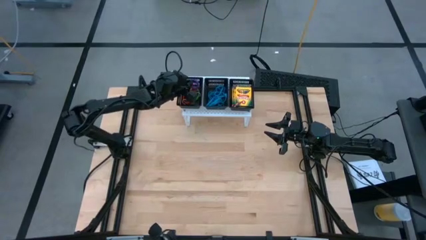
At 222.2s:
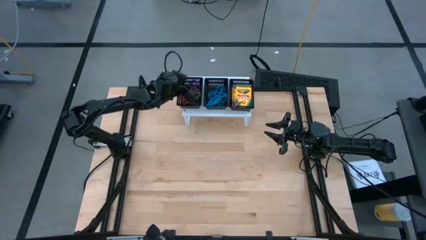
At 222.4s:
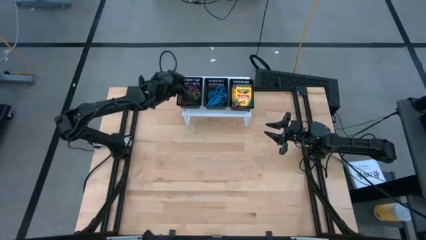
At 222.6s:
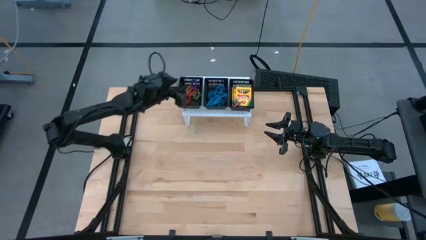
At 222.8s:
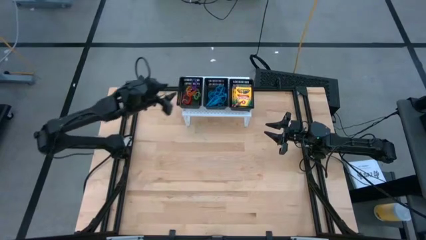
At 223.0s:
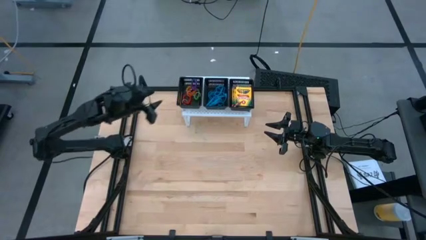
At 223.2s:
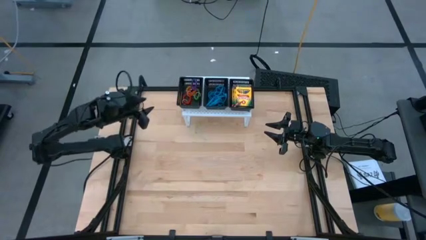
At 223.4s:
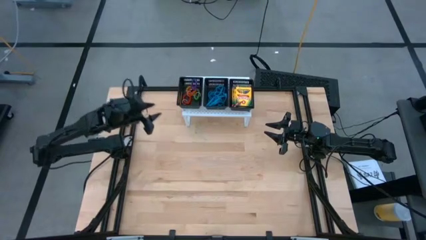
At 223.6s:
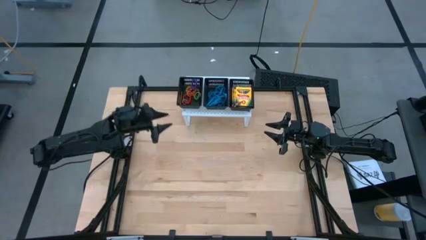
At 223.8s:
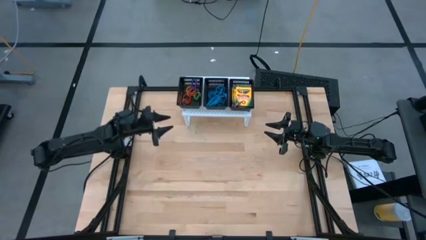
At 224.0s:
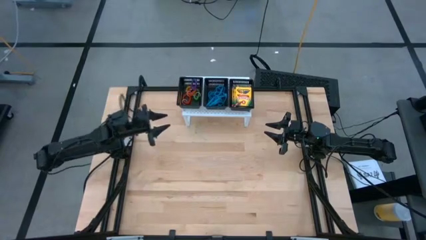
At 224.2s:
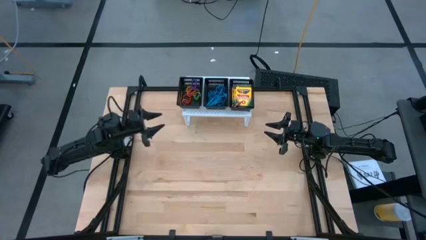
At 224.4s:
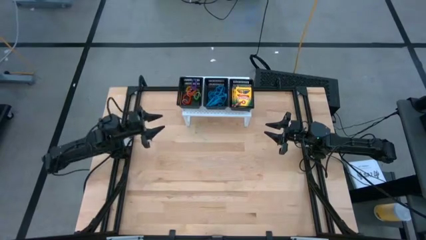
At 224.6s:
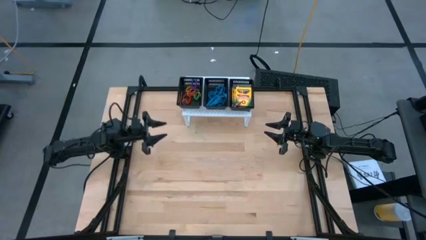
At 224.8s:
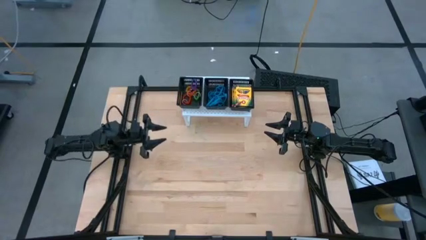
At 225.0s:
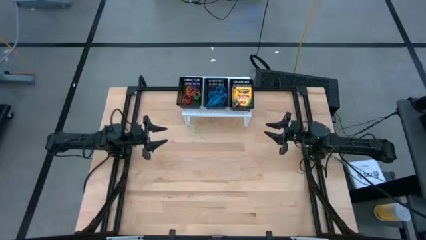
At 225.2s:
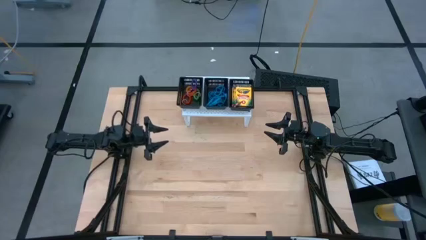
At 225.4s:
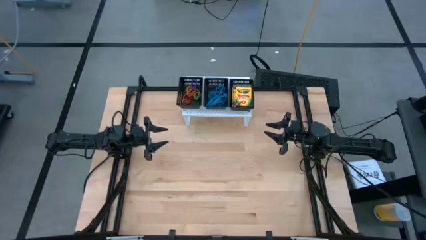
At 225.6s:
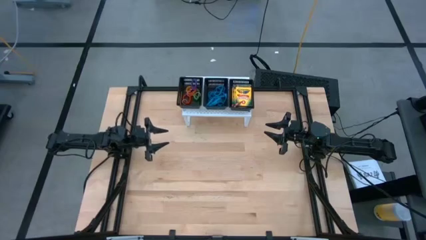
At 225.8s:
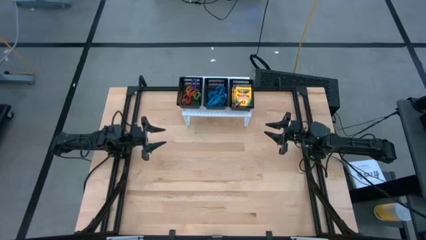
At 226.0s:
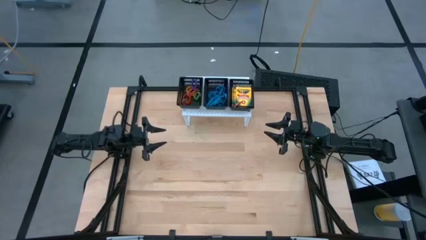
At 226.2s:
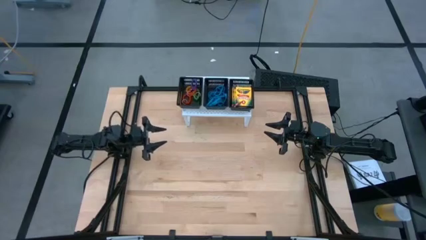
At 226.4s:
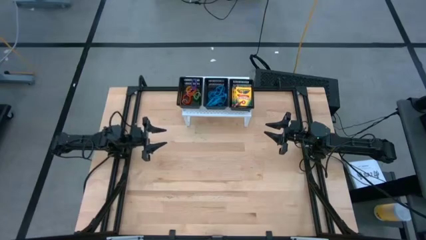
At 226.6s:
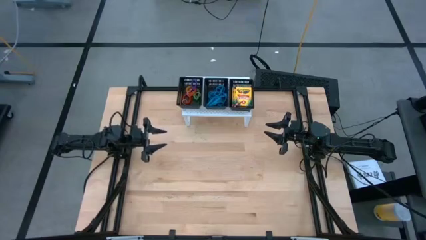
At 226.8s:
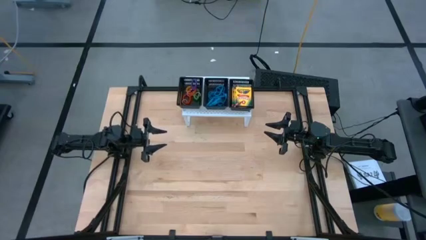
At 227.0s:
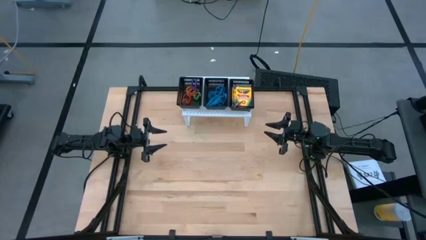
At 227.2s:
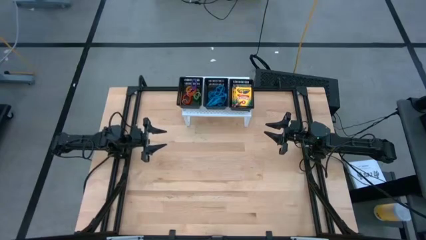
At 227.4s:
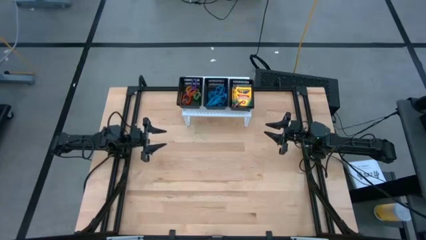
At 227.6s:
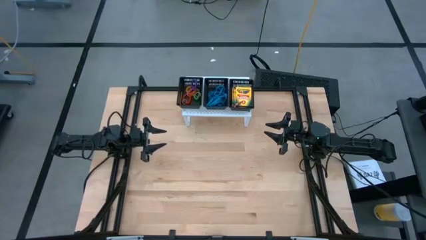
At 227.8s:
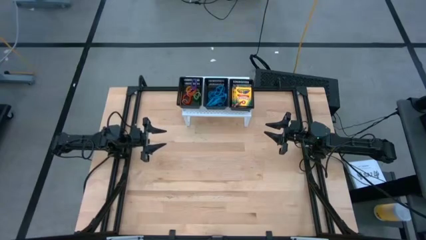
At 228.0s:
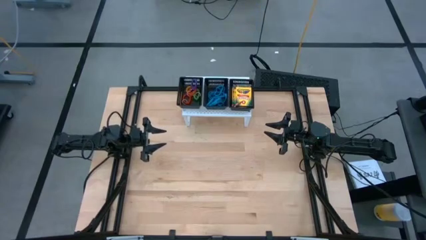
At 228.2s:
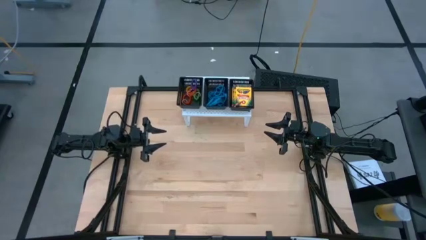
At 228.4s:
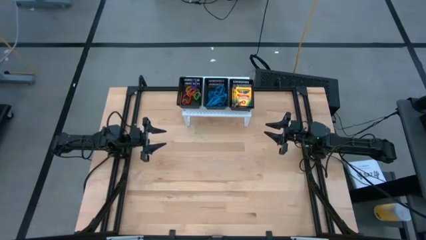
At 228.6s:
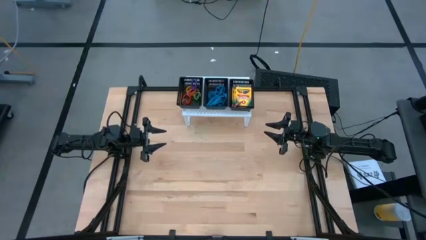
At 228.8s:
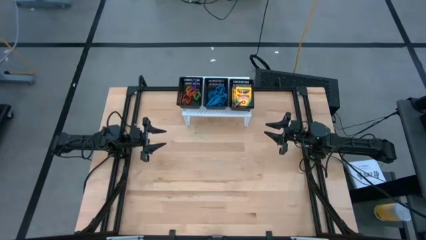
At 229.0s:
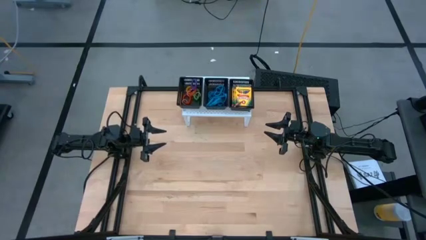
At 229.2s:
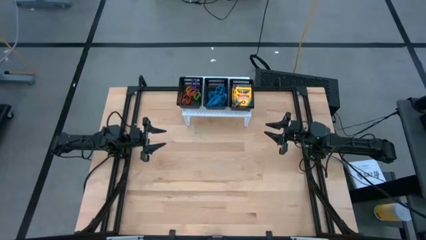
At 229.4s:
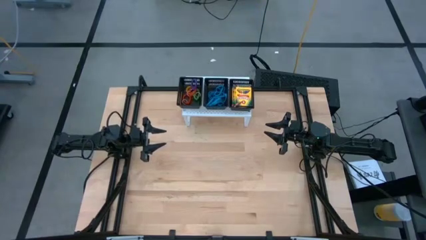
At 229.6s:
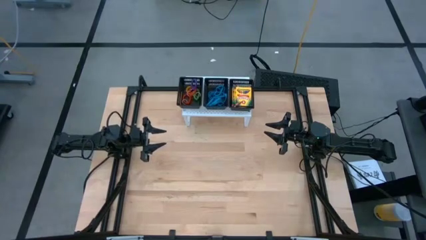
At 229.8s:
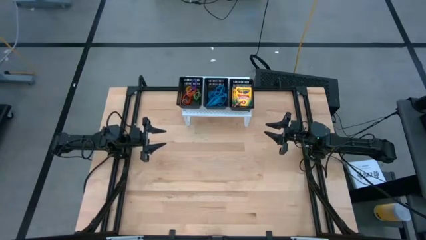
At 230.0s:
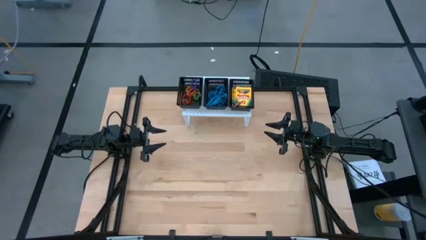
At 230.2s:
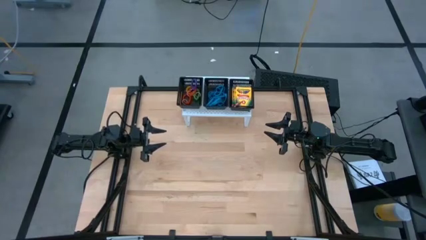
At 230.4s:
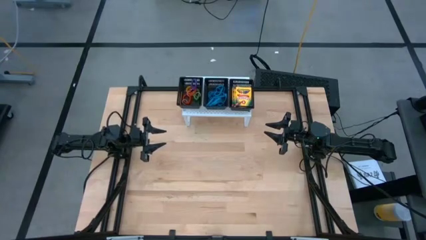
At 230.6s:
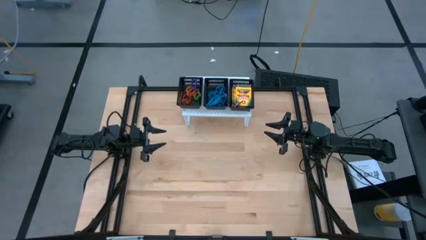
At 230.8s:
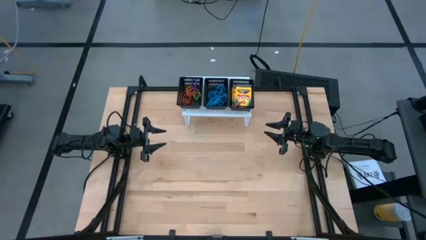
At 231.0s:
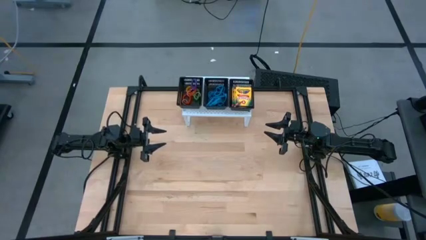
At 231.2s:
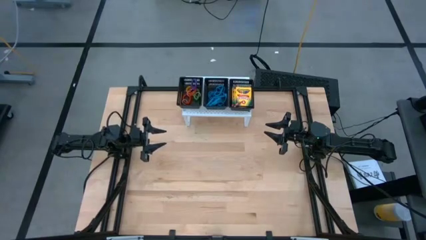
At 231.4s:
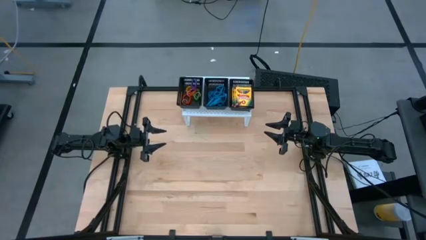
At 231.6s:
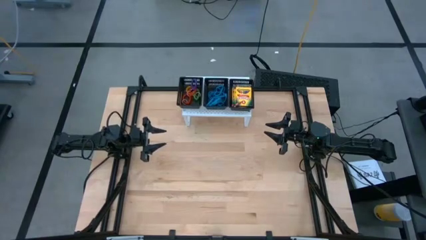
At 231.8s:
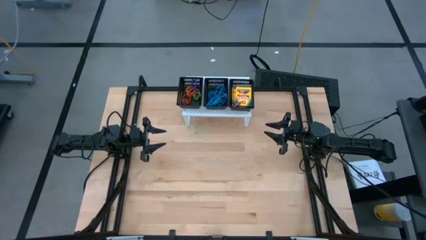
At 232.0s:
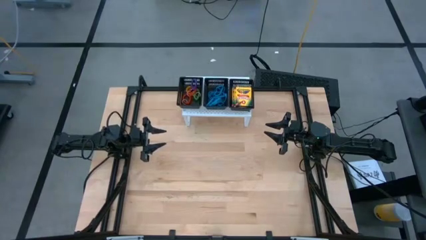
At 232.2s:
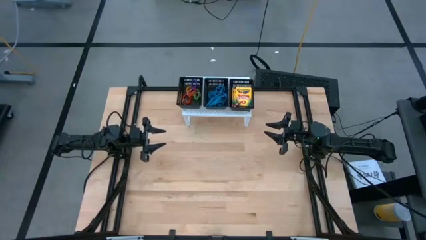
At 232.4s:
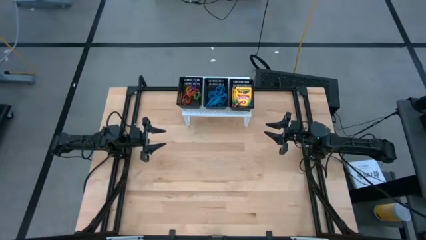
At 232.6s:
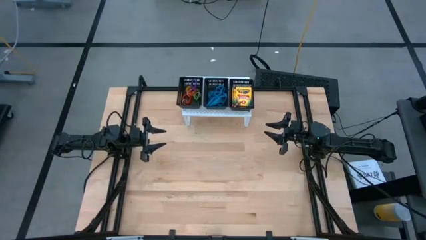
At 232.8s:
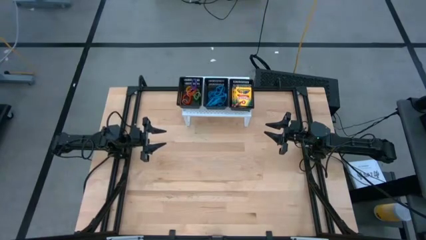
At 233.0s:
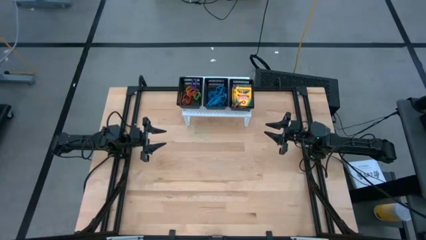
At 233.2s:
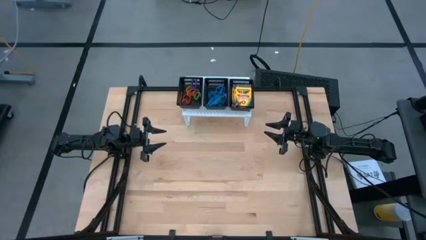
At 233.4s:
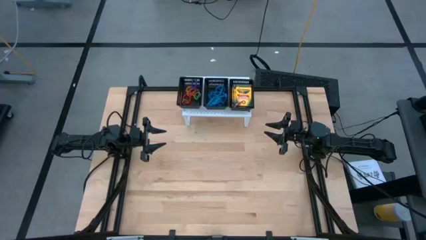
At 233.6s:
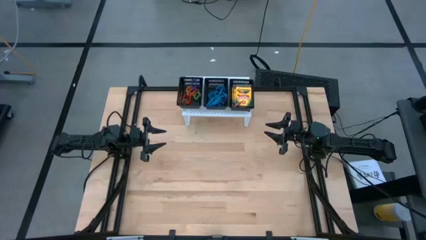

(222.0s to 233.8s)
Task: Pick & Place Office Desk Supplies
Return to Home Position

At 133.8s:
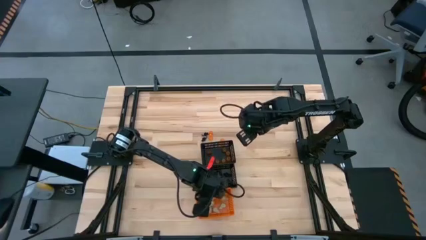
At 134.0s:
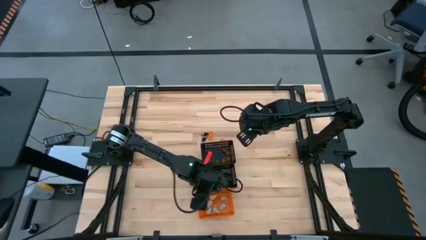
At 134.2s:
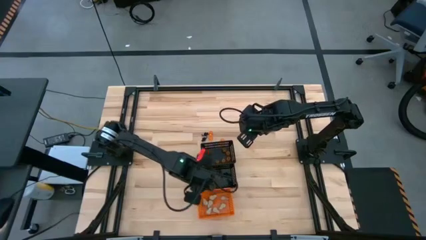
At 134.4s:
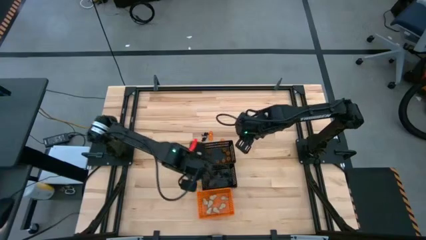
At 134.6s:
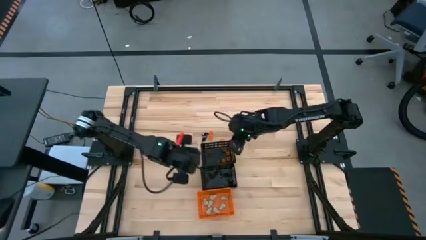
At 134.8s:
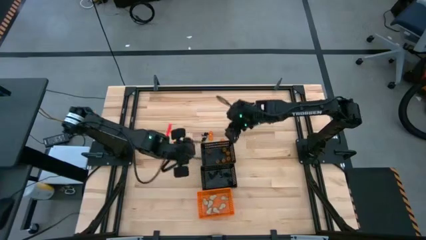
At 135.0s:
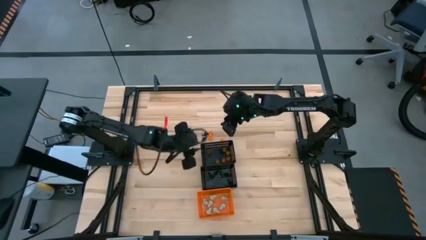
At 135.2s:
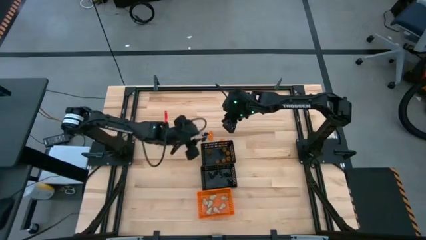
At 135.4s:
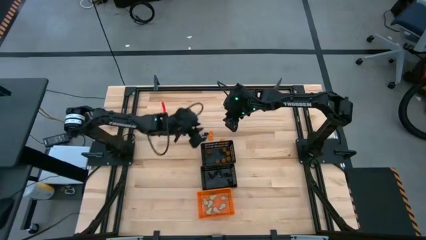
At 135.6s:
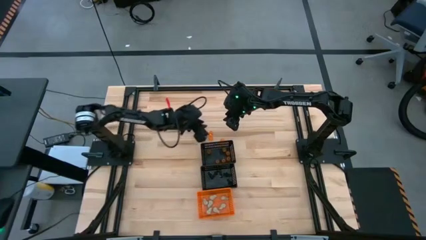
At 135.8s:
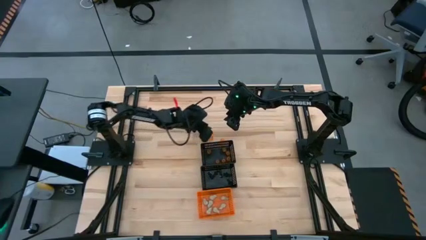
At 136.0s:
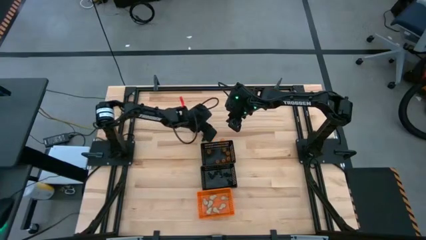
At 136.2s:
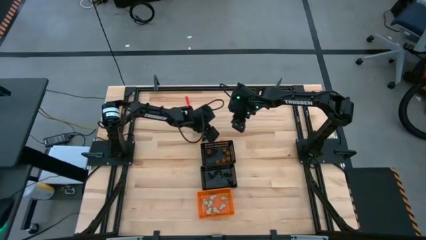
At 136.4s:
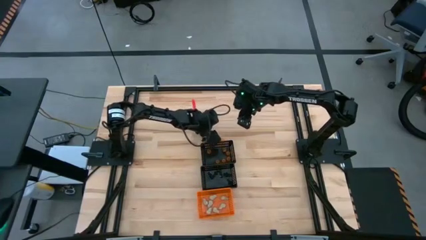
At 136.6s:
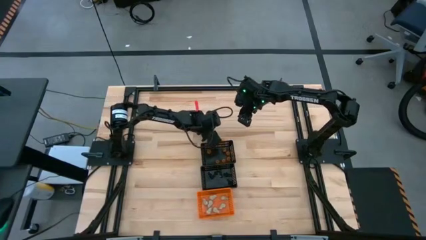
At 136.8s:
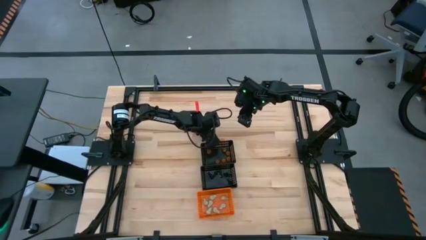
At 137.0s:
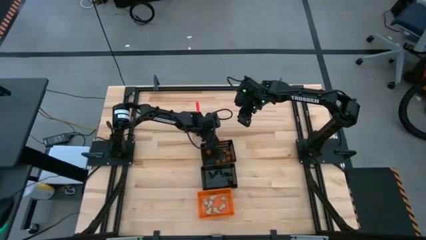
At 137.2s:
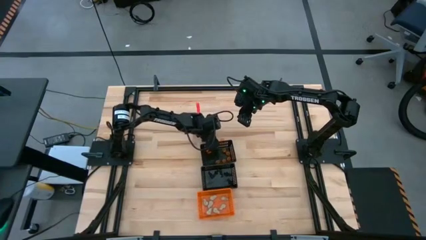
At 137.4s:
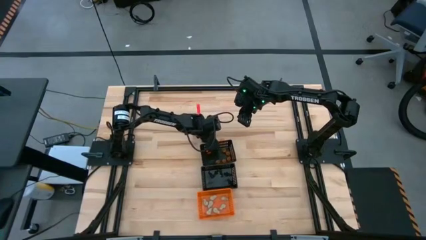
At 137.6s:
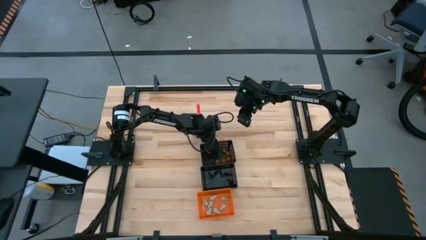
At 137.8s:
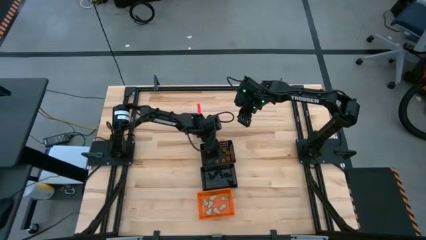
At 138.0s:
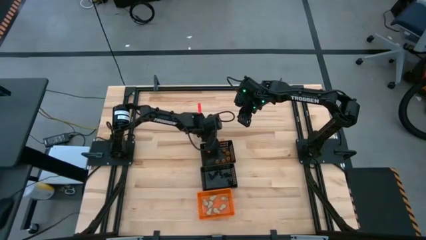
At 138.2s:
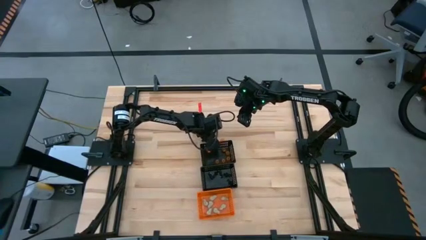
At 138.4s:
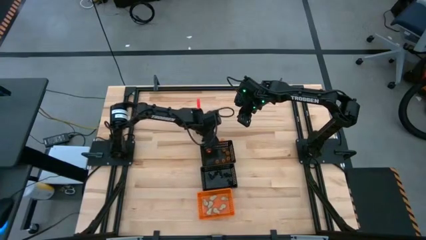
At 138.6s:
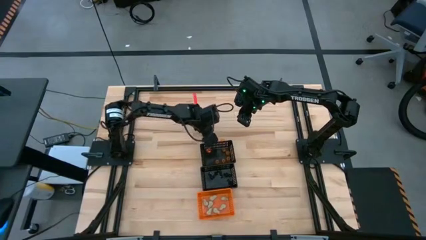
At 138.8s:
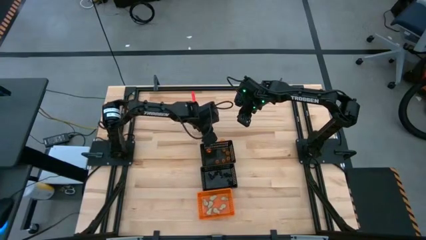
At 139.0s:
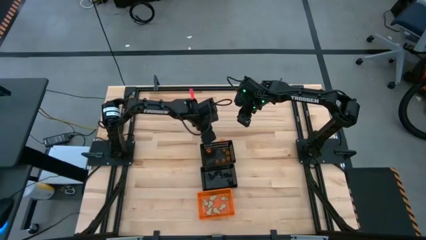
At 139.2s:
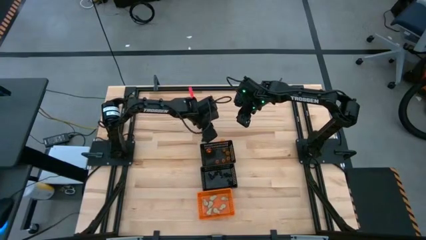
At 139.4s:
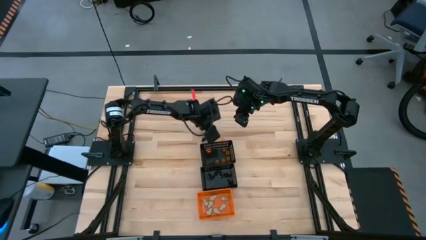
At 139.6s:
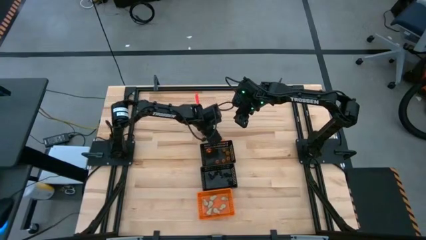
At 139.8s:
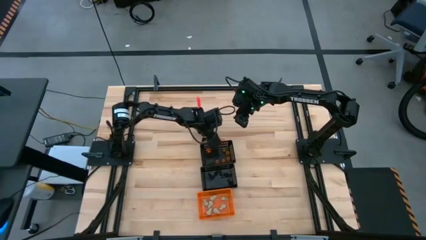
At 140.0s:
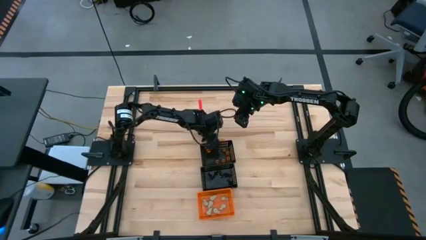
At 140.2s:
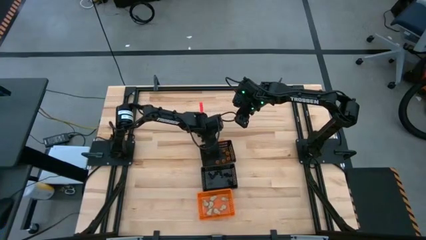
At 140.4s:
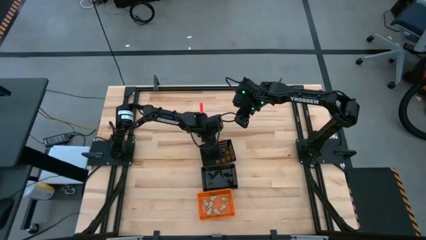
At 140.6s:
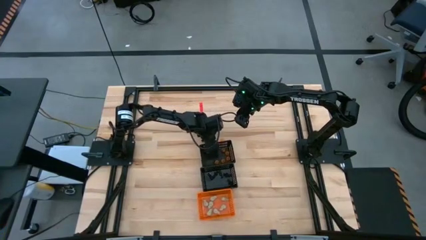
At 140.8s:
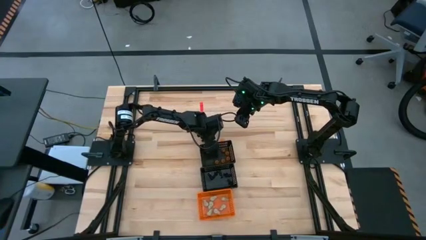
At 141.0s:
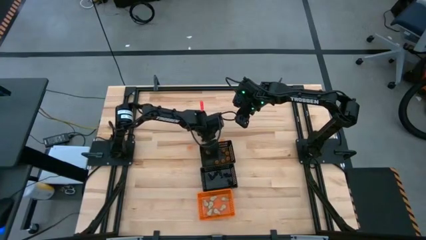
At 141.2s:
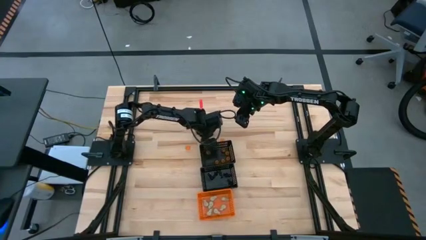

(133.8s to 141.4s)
Task: Sort Halloween decoration
Put the orange pumpkin toy into the top black bin
